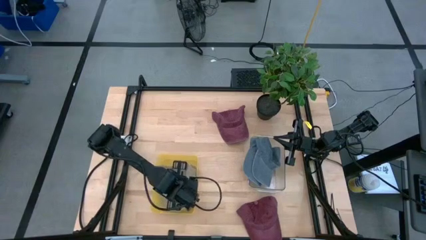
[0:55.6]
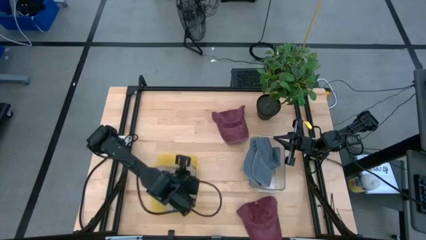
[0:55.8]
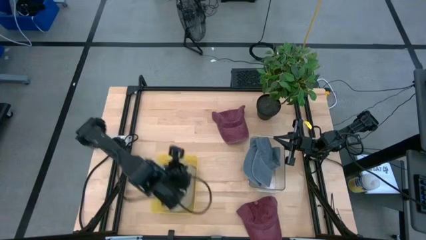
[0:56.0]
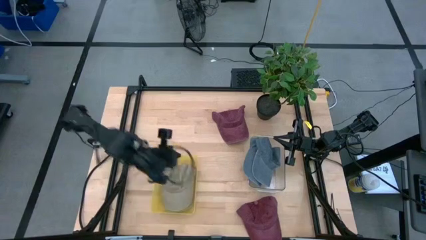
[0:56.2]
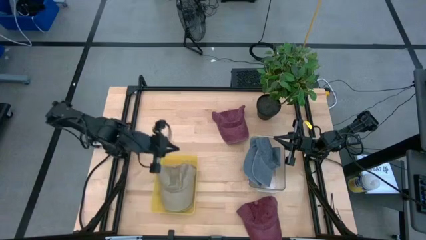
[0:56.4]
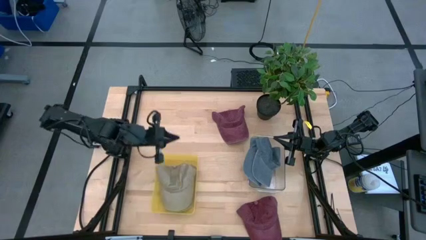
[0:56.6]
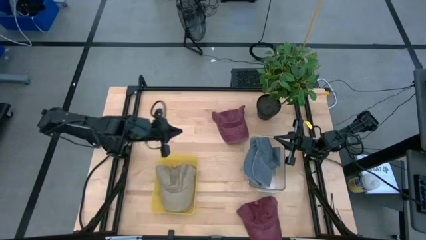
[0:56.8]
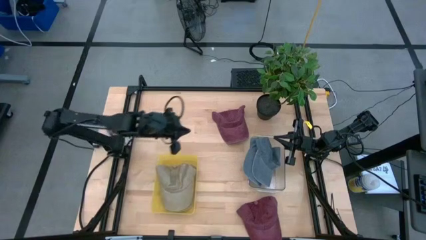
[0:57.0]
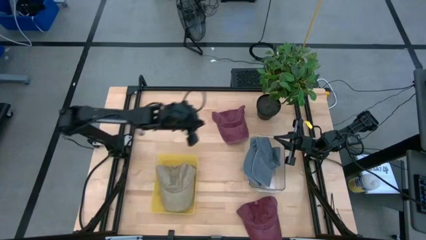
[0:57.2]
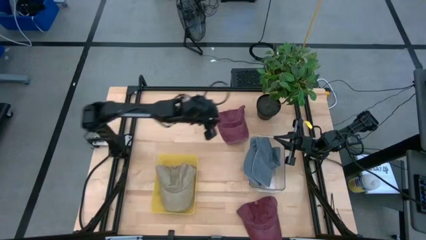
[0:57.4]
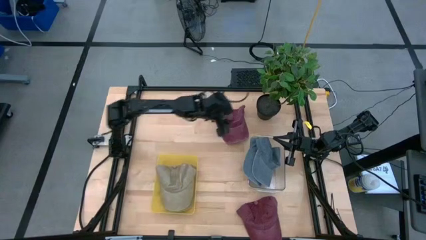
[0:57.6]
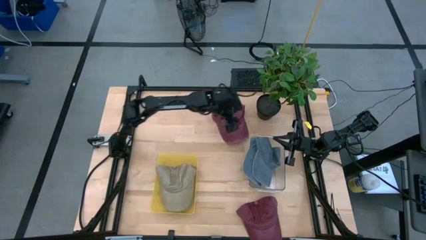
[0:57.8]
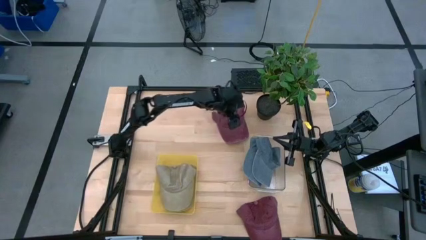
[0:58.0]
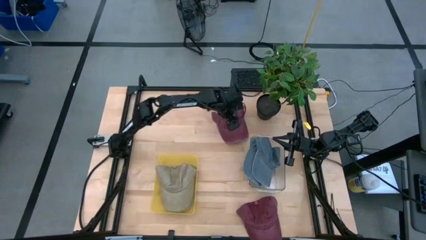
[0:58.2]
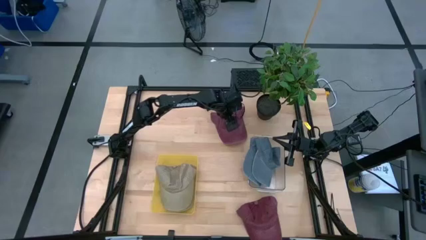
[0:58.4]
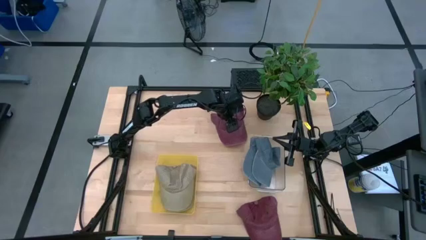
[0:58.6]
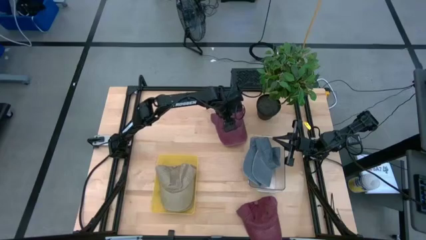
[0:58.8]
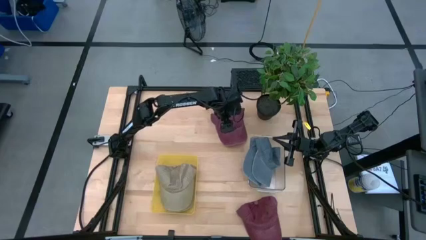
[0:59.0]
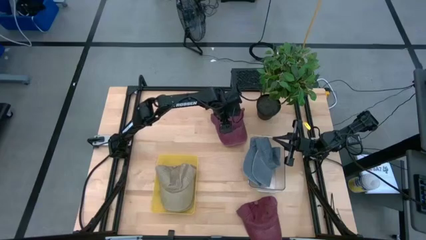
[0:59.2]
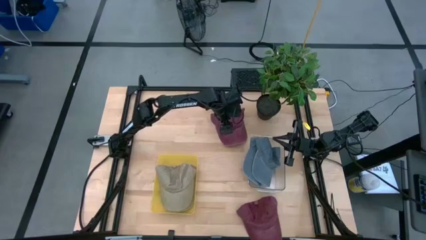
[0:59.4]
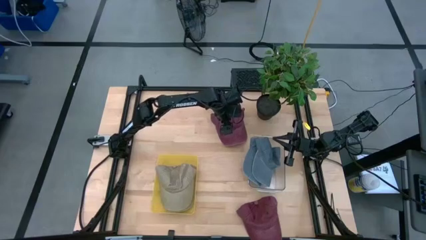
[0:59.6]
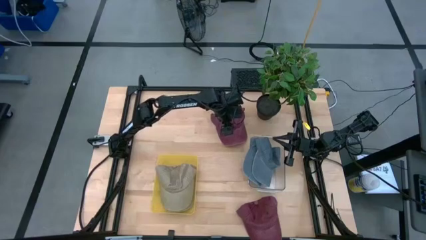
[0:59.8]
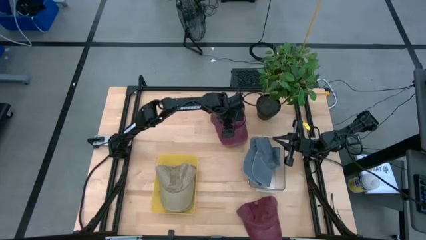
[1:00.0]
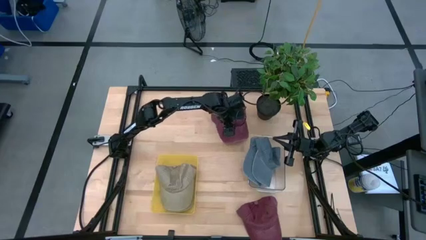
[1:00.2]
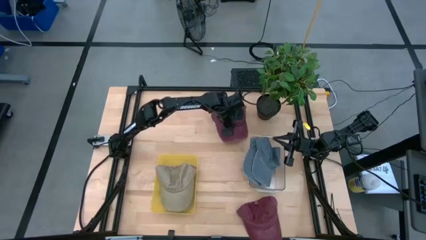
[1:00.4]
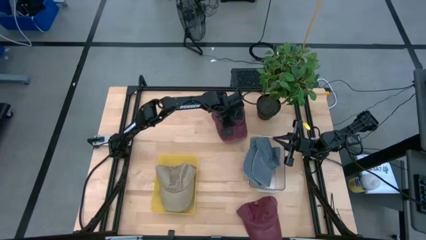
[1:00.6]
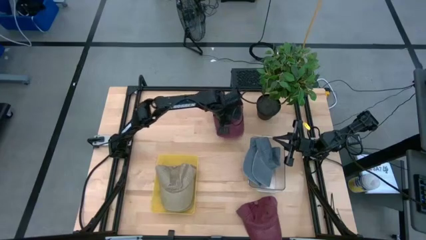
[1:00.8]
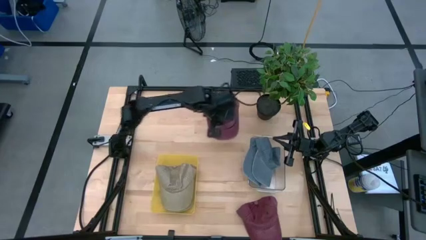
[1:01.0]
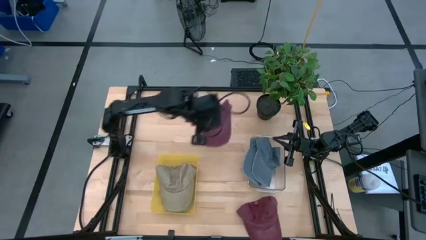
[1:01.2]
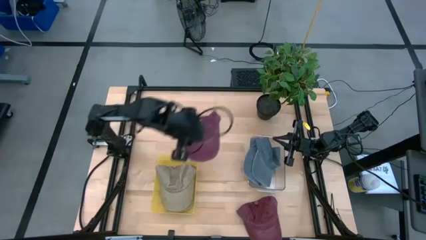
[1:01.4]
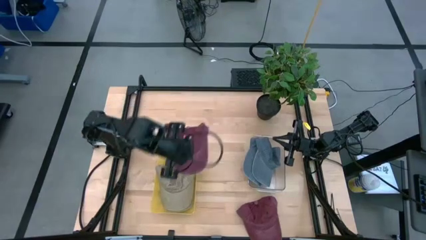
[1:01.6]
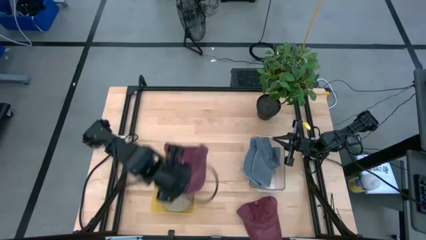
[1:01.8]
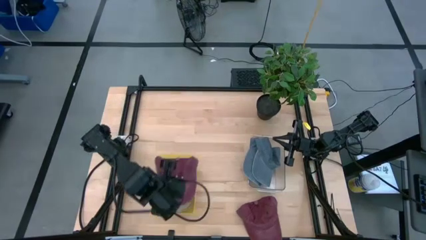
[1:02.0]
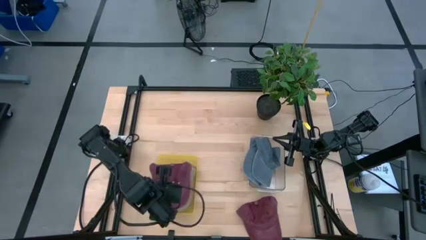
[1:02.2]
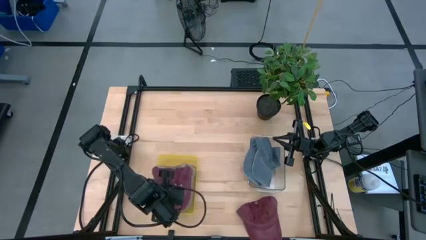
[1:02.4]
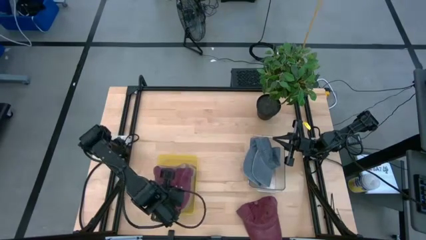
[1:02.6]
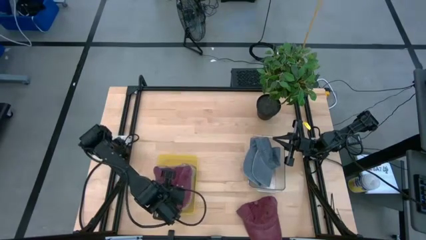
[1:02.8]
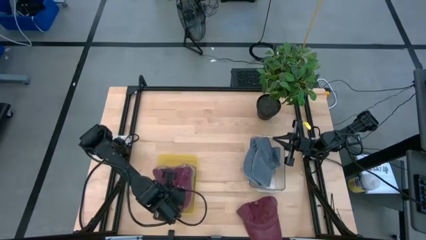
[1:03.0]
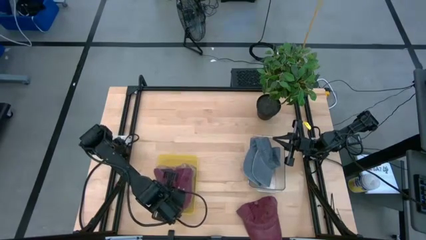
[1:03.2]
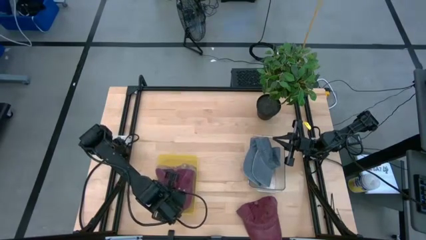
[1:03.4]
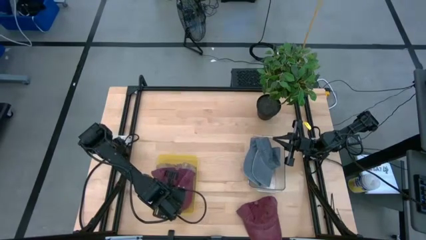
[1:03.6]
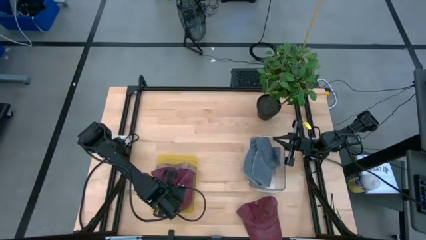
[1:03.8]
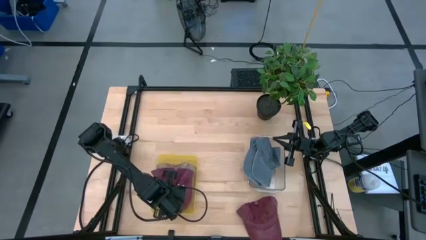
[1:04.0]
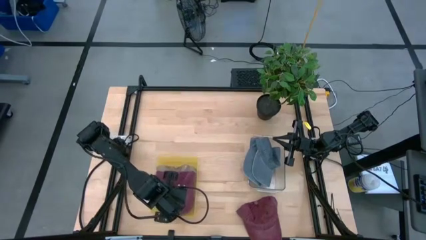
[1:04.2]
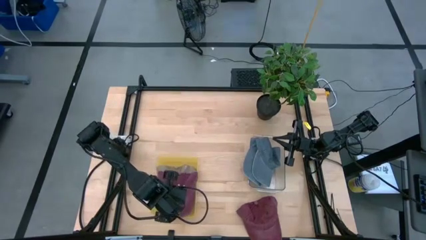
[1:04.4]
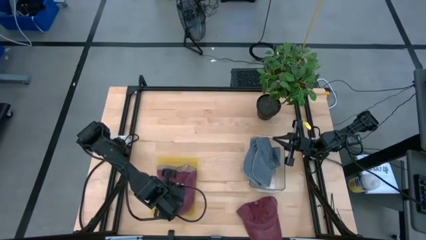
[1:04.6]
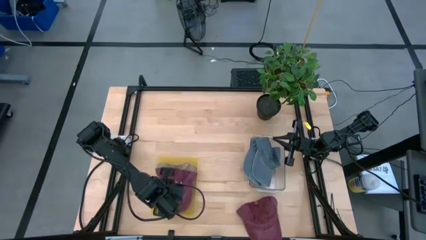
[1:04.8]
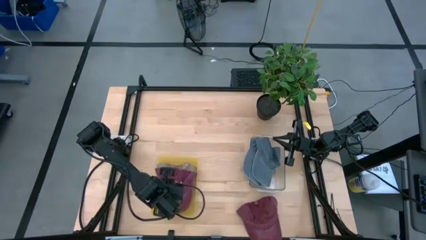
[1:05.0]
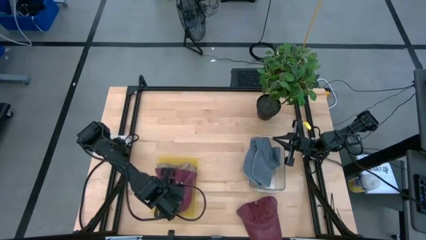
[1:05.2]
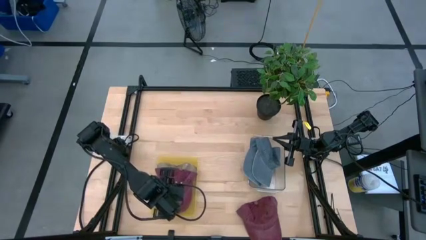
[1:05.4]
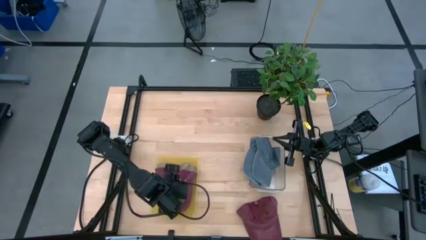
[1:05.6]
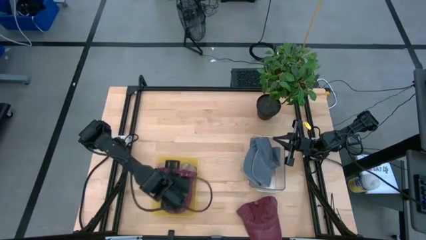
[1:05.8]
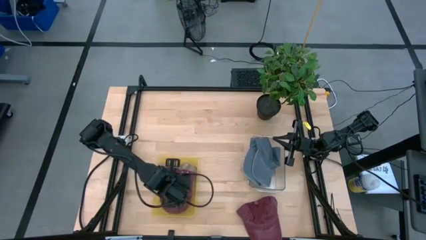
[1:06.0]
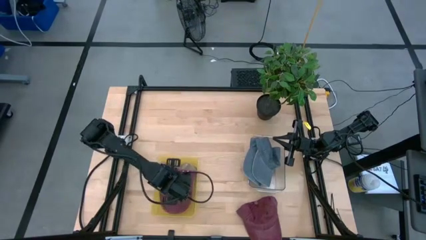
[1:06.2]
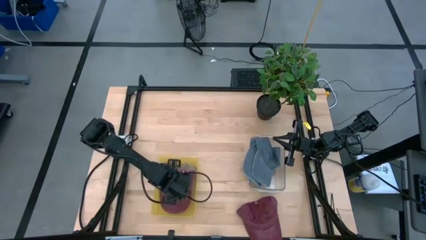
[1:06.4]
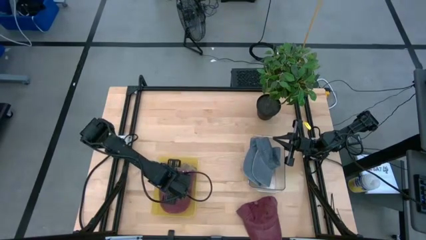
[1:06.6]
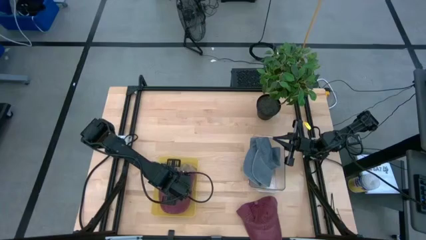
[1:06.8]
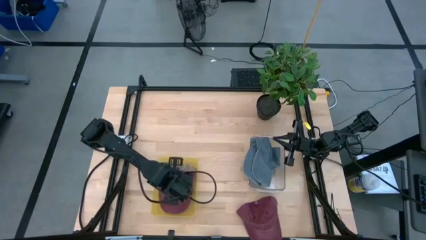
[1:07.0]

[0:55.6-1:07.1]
Task: Pick & Place hat
Put the top red cap into the yellow bin
